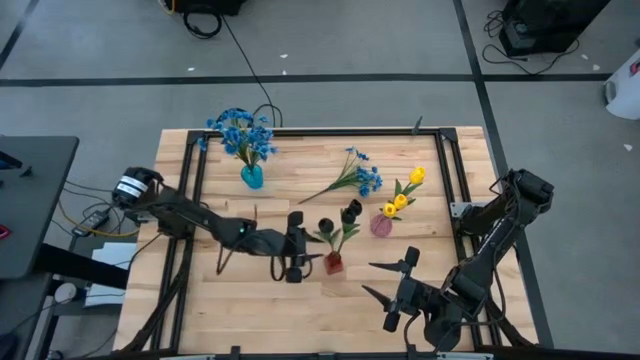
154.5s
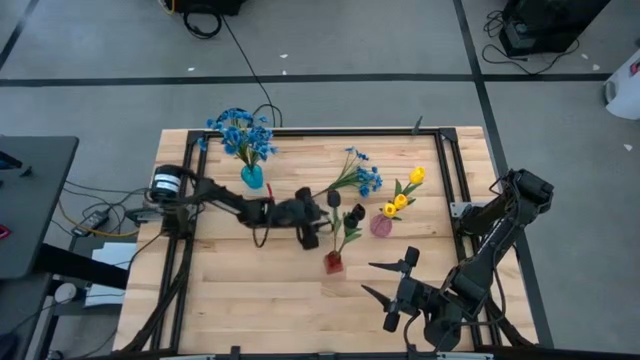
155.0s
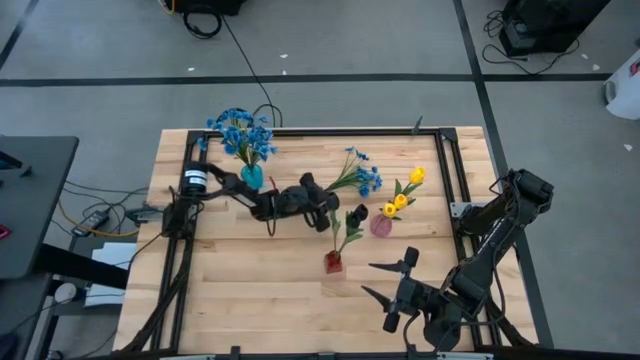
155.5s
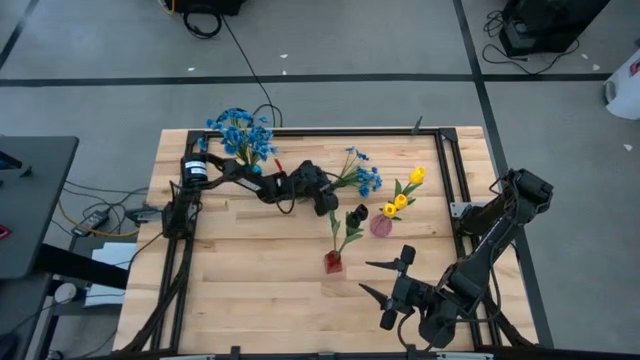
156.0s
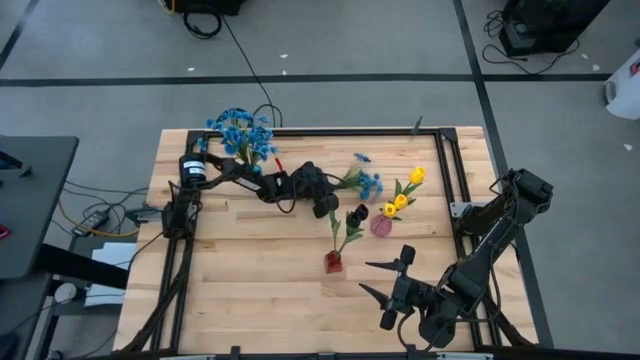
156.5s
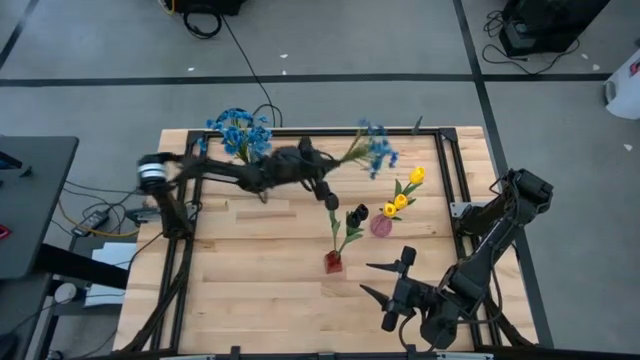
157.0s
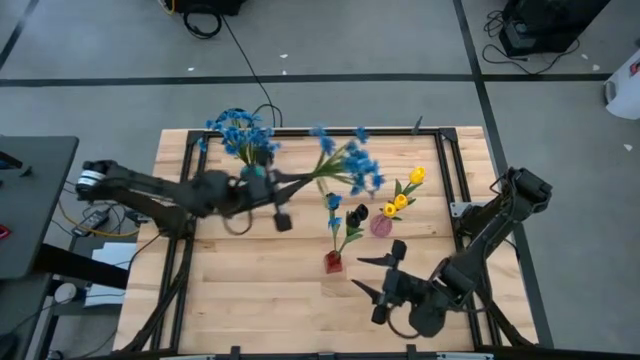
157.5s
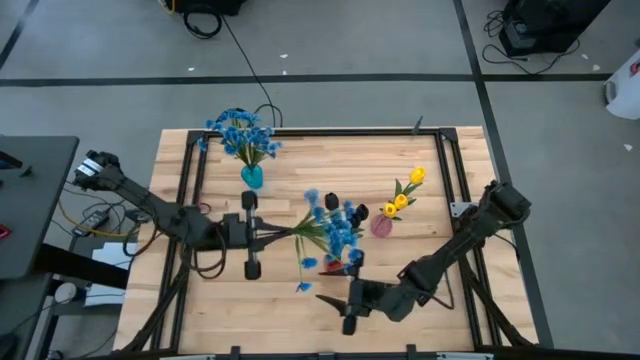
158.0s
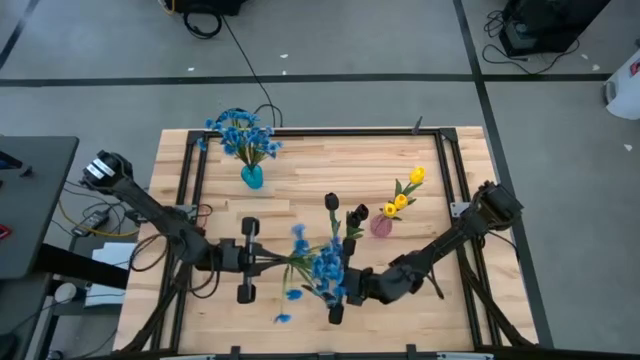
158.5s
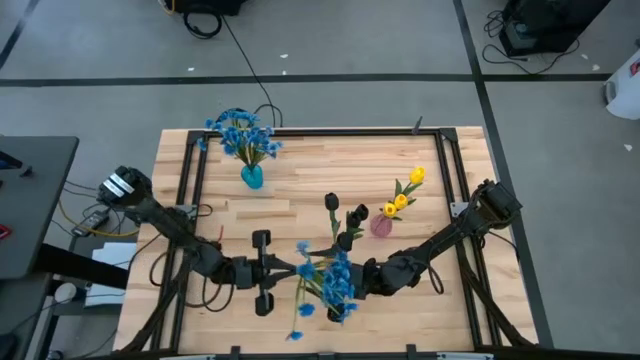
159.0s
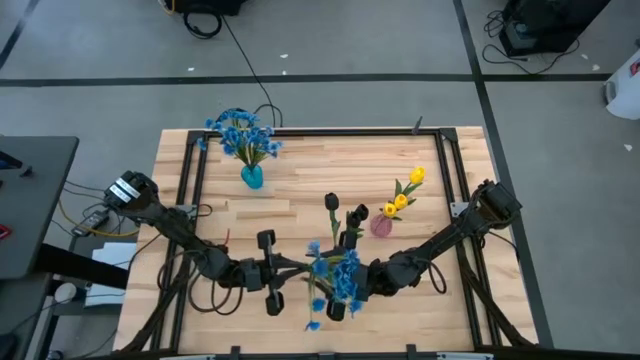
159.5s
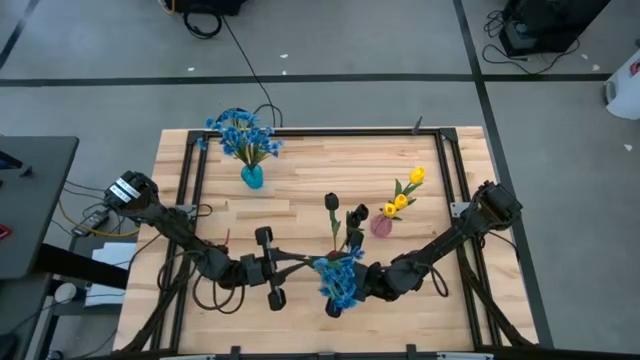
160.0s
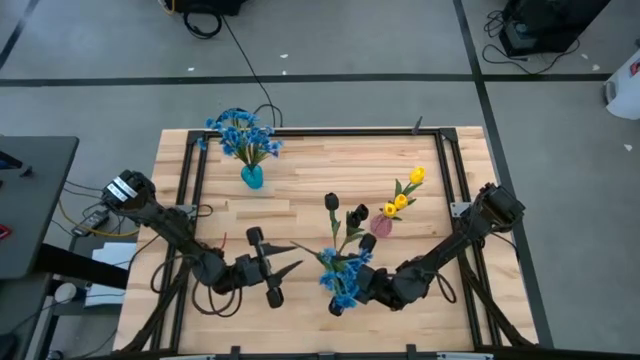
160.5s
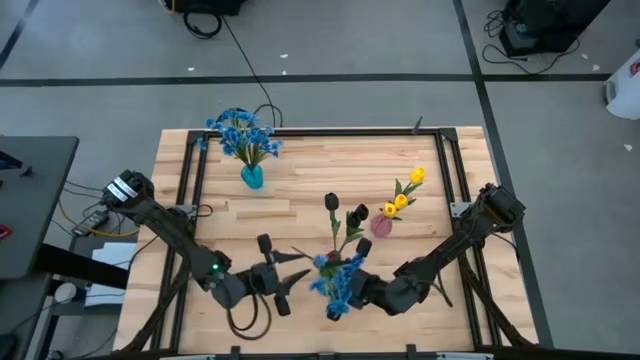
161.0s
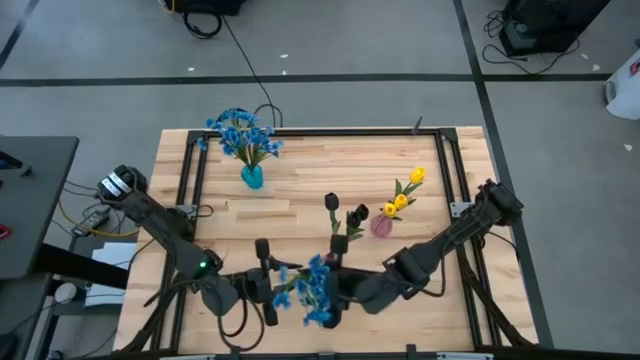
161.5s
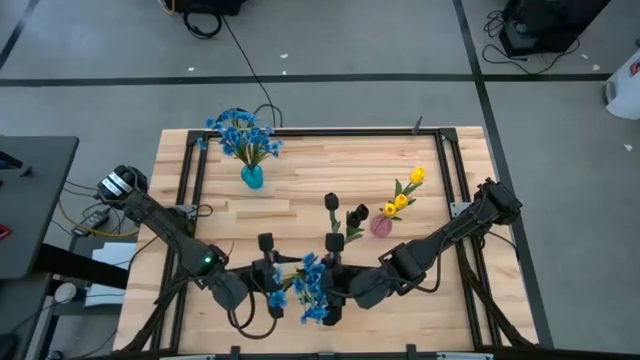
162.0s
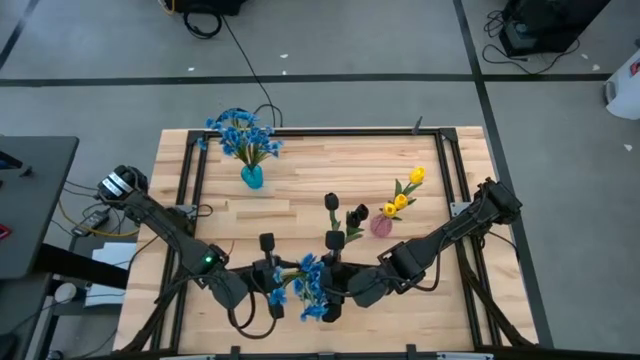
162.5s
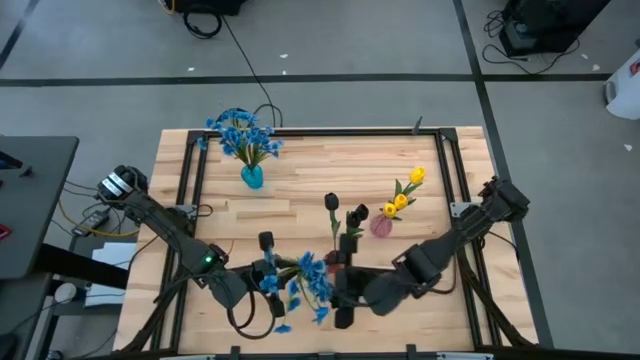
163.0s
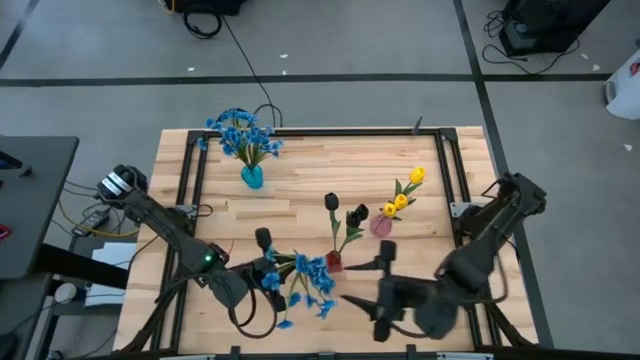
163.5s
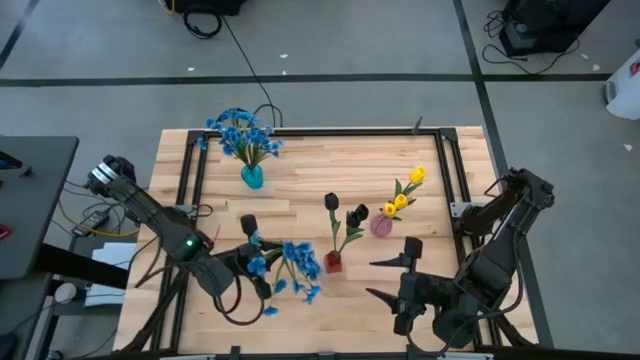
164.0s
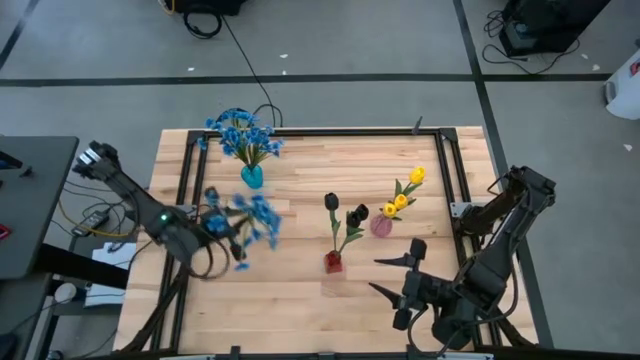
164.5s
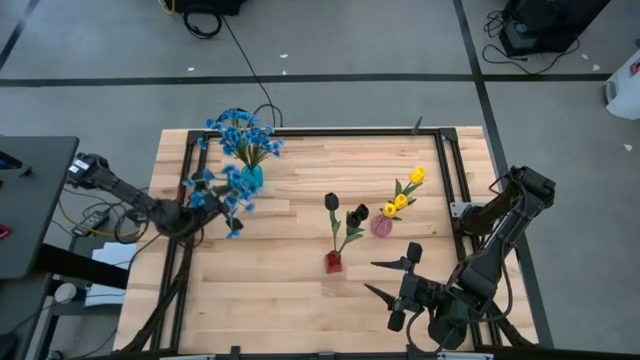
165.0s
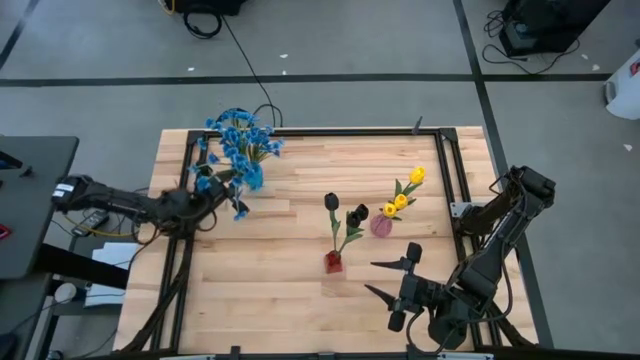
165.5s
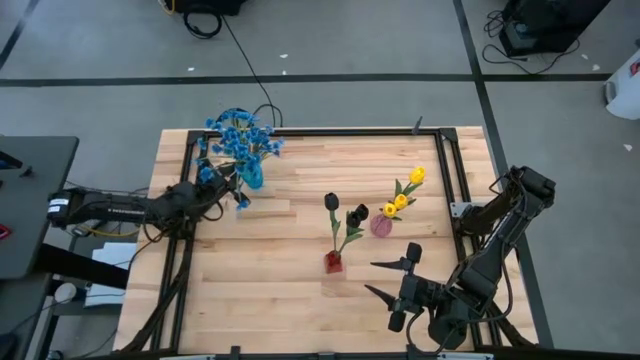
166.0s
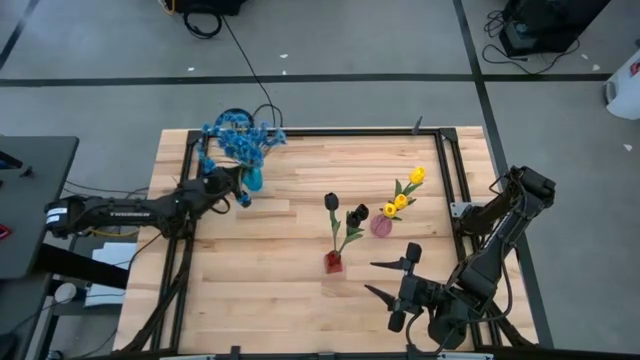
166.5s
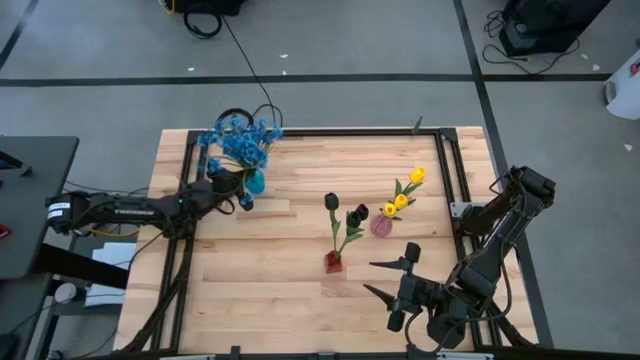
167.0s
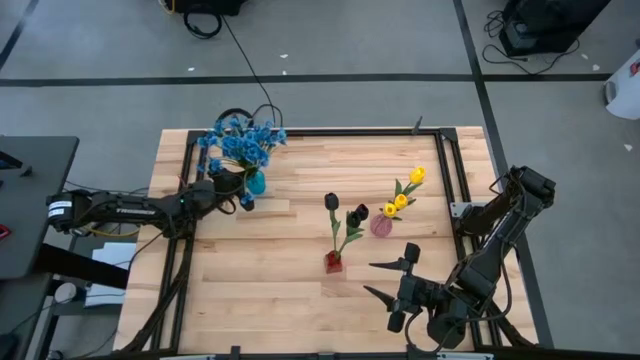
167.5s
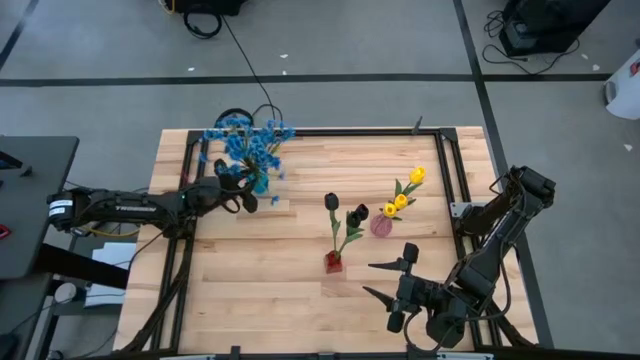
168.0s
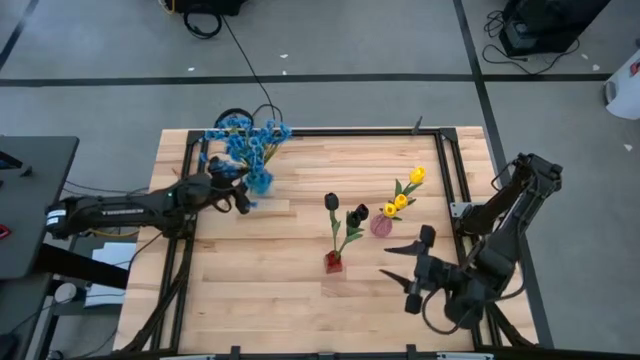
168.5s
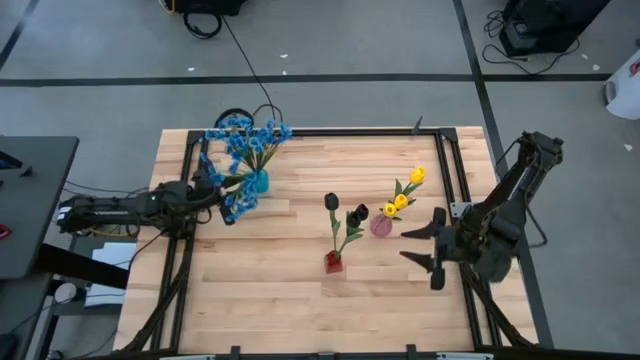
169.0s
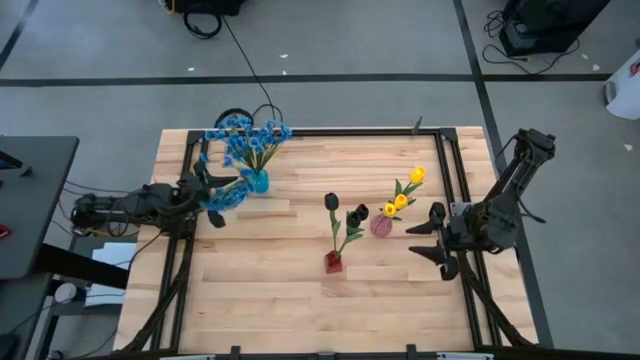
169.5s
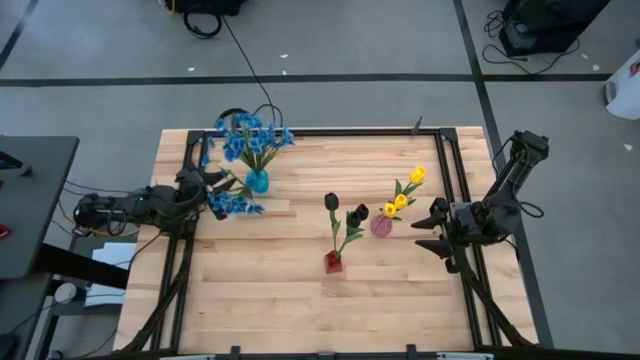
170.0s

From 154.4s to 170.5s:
Task: Sort flowers into vase by color
Put the blue flower into the blue vase

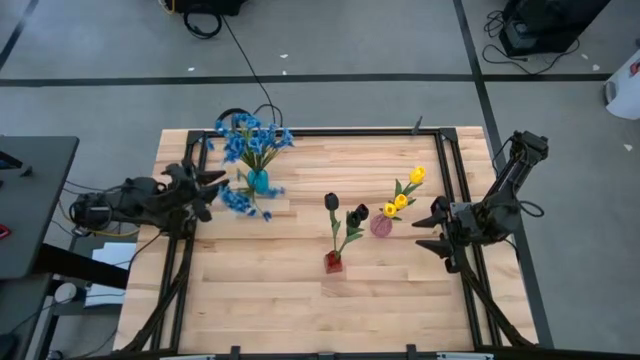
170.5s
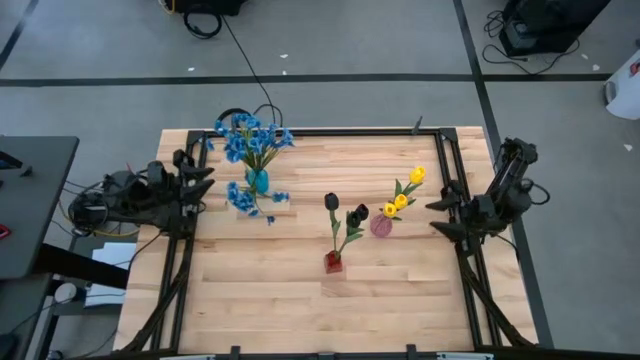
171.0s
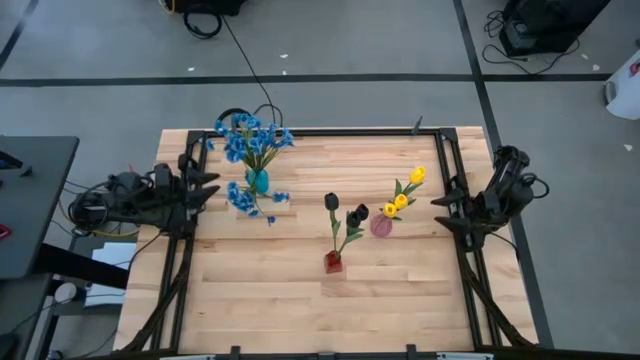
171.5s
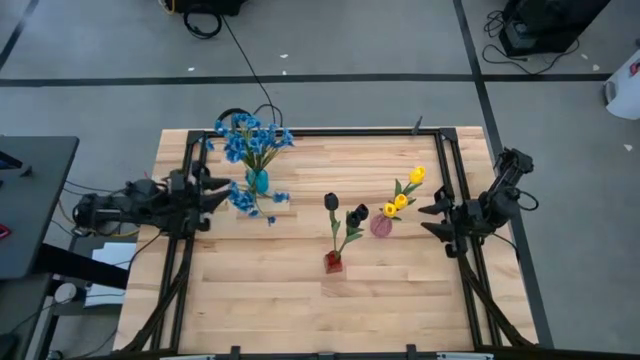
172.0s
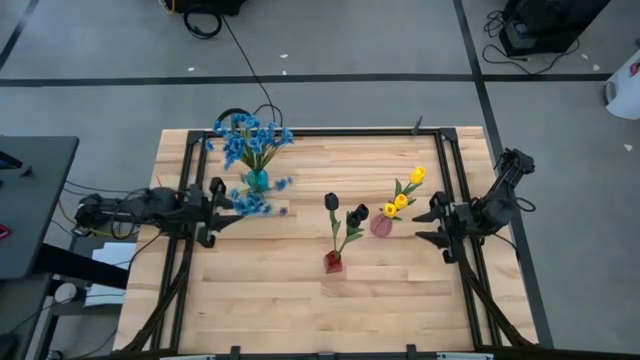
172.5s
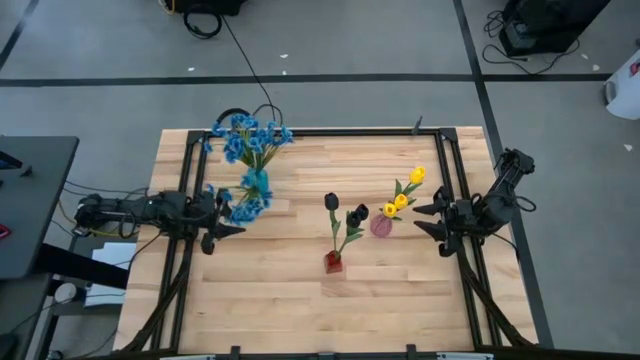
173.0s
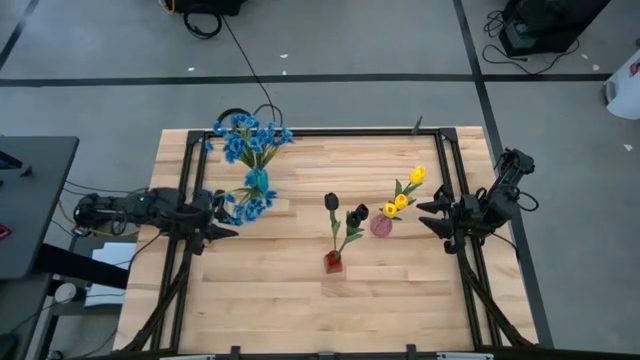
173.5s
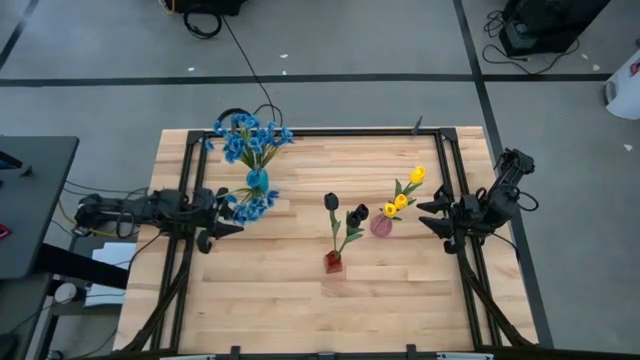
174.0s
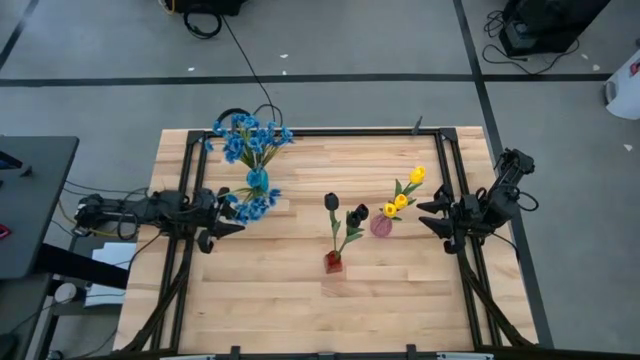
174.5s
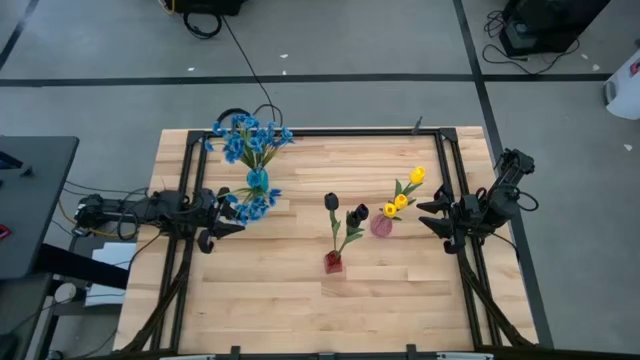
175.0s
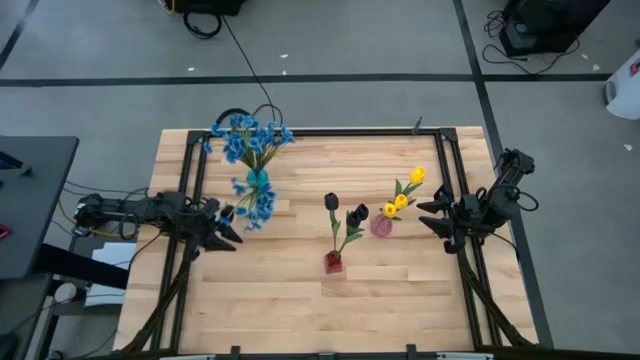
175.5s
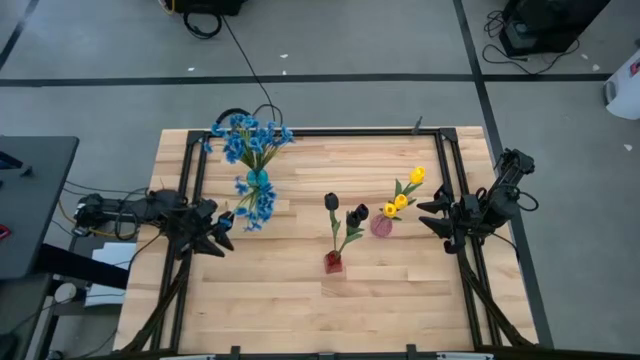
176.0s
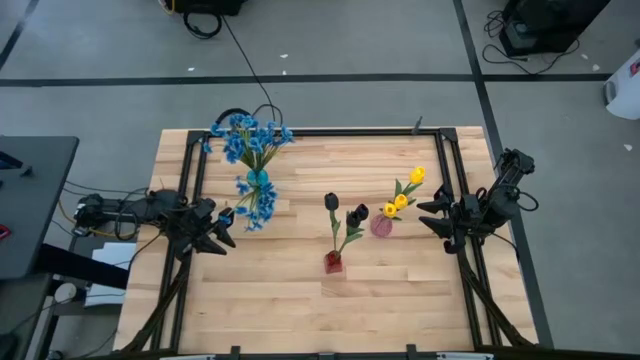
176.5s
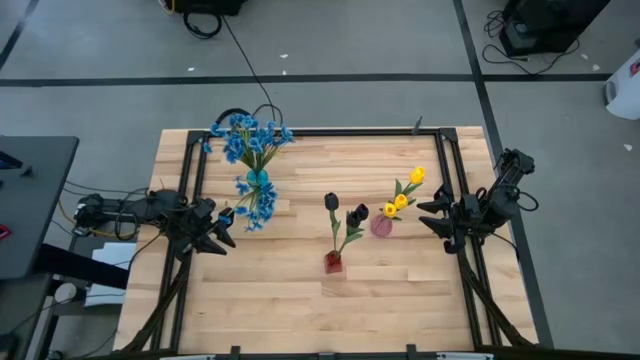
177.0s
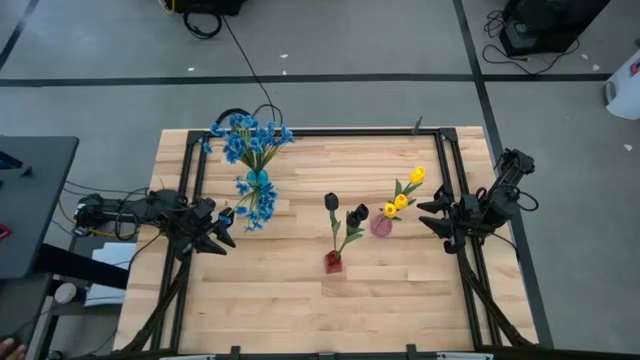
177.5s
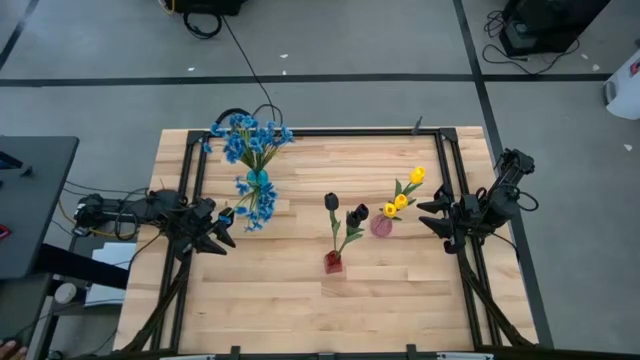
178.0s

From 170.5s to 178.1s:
Return to Home Position
